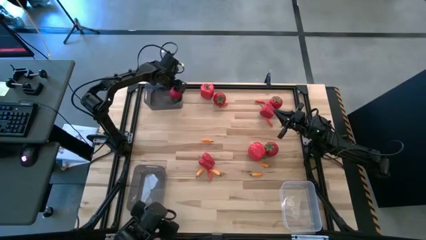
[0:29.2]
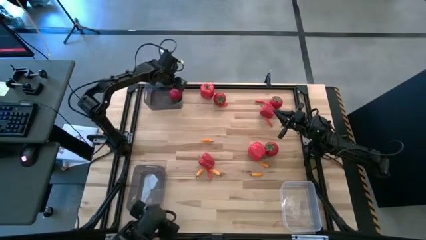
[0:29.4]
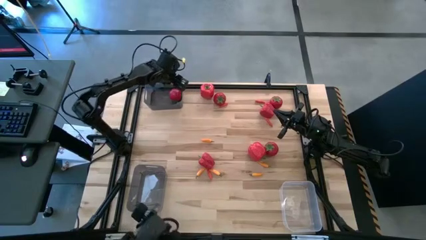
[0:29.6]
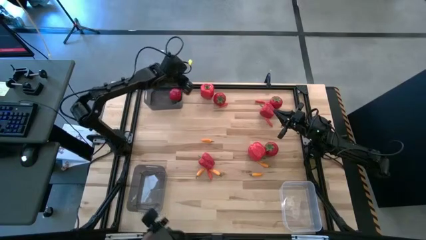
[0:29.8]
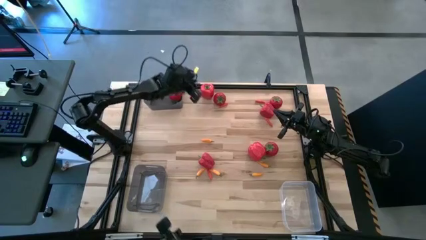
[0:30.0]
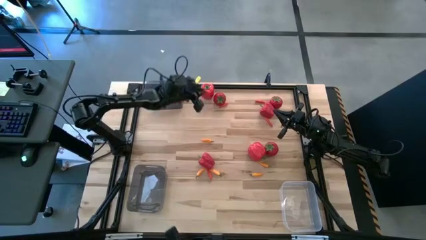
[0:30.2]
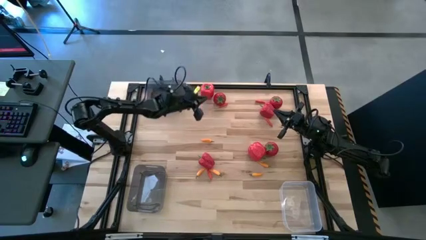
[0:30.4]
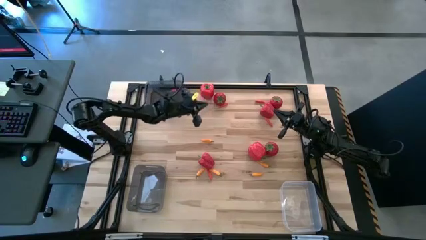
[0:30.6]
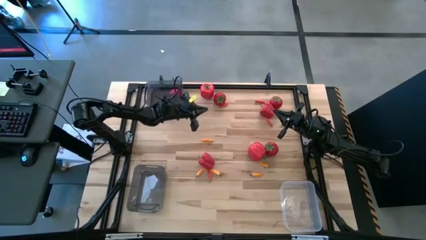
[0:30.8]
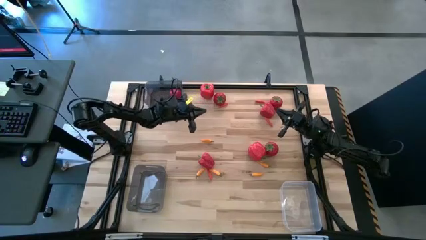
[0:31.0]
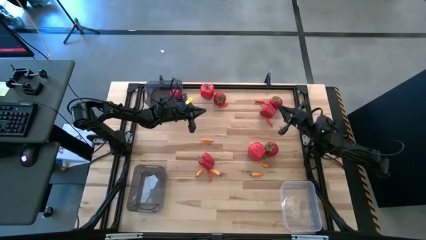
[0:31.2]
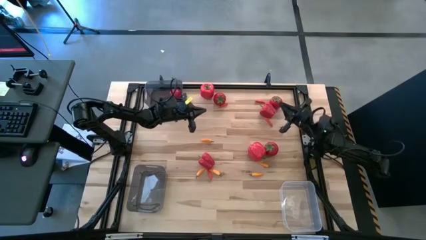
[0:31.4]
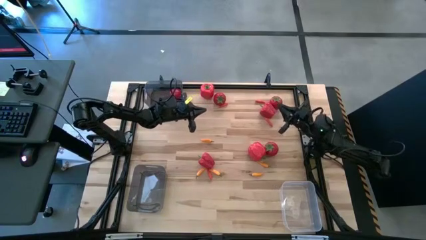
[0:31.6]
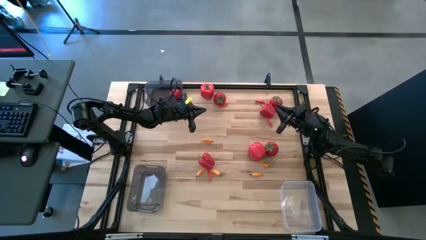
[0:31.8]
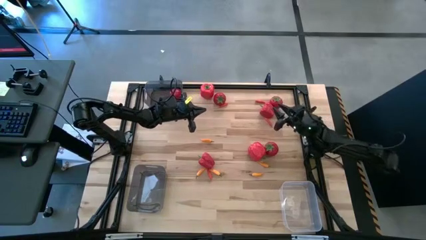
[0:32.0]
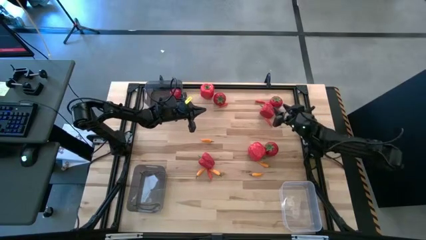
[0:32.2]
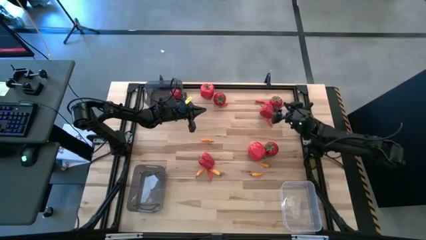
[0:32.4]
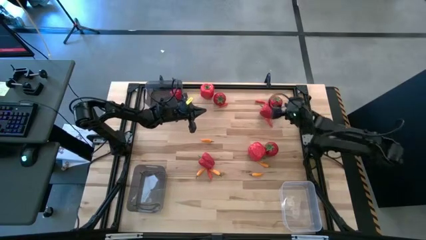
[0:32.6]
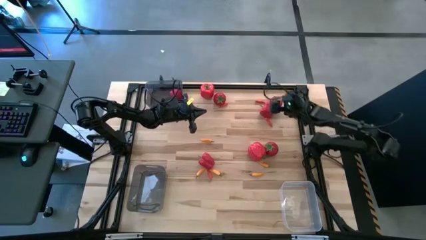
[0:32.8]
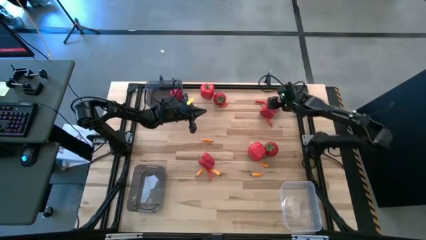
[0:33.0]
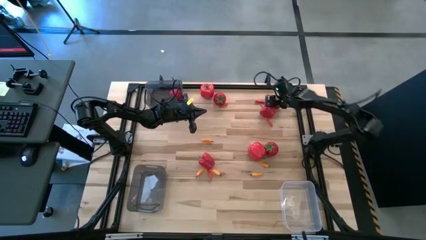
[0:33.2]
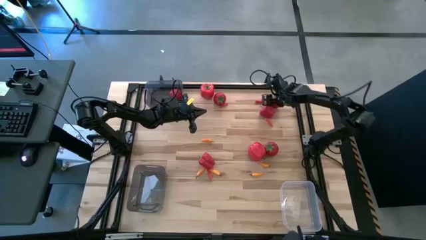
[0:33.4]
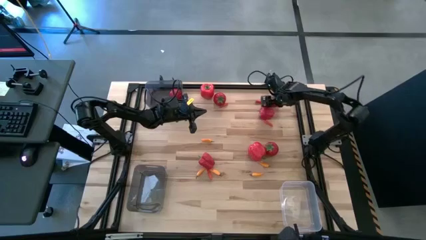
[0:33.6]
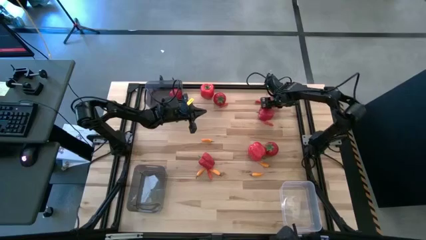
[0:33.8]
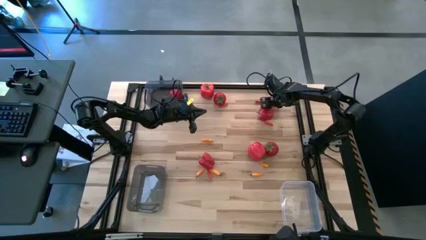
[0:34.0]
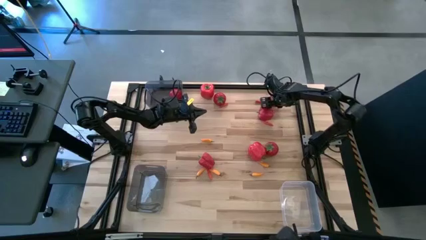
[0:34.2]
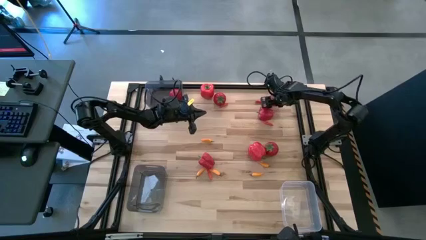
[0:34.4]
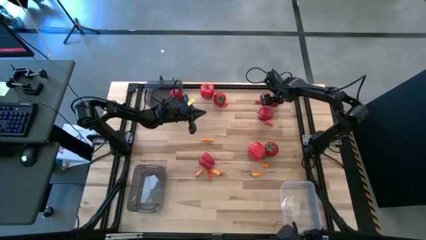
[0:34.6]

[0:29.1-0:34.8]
Task: Sort produce into baskets
Put the red tomato into the top black bin

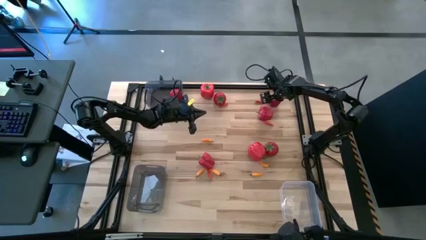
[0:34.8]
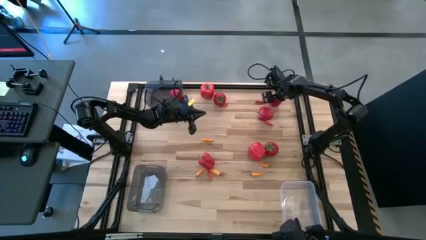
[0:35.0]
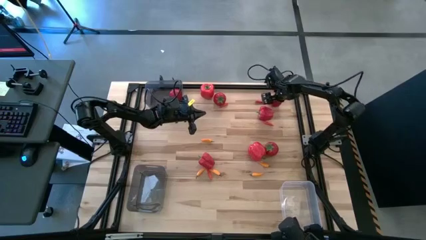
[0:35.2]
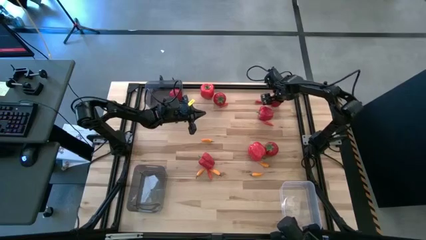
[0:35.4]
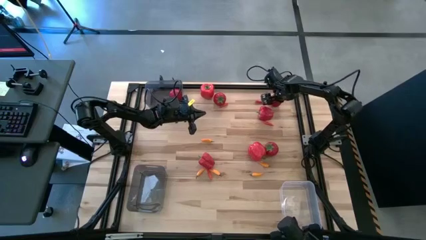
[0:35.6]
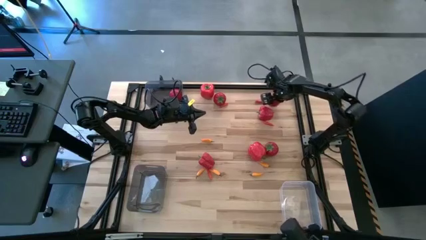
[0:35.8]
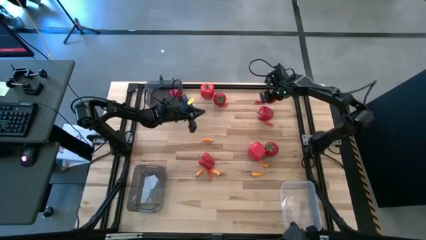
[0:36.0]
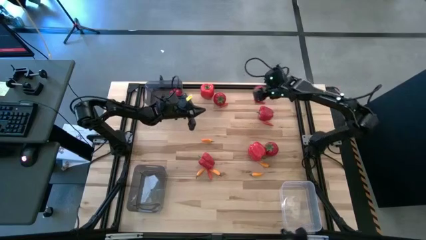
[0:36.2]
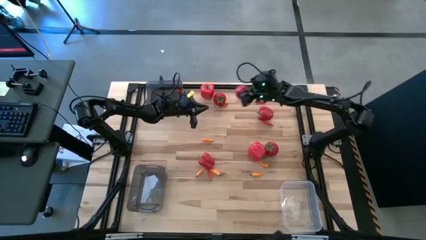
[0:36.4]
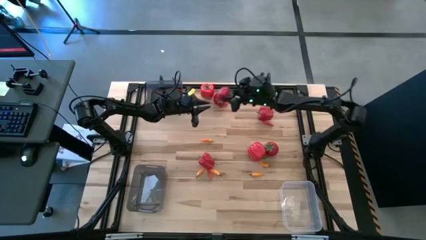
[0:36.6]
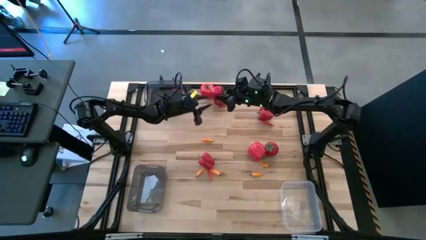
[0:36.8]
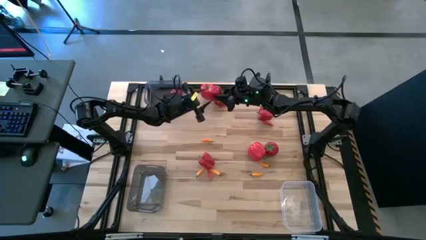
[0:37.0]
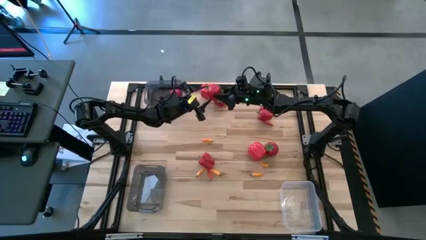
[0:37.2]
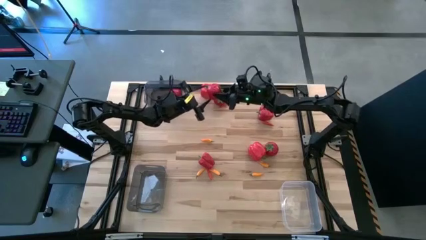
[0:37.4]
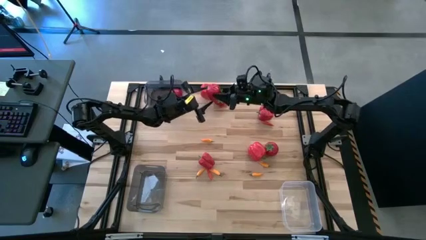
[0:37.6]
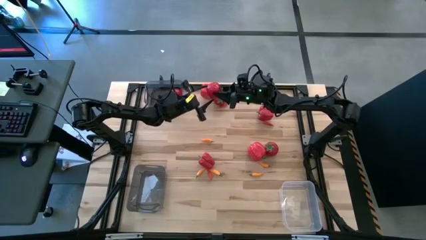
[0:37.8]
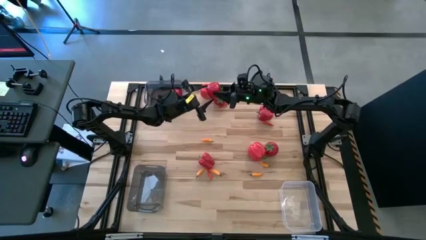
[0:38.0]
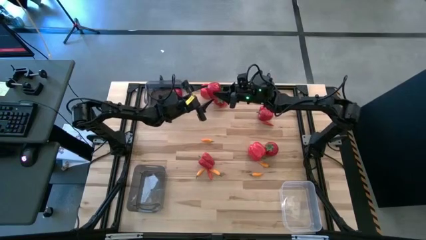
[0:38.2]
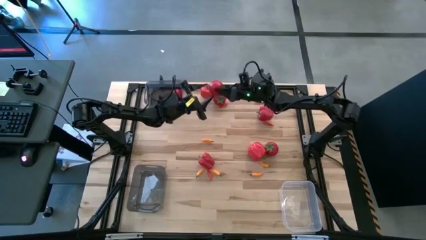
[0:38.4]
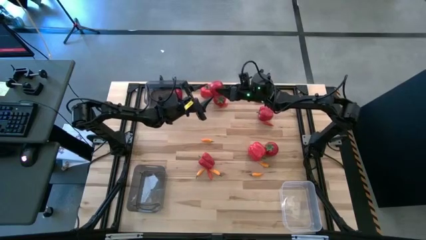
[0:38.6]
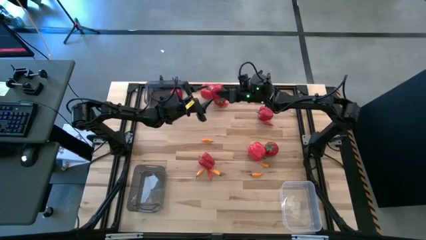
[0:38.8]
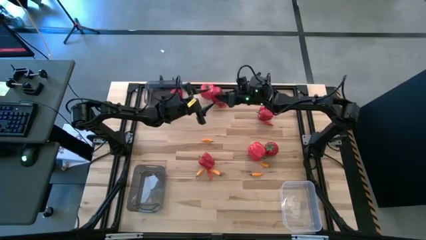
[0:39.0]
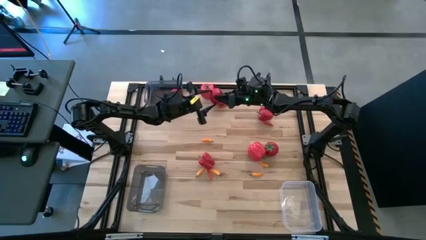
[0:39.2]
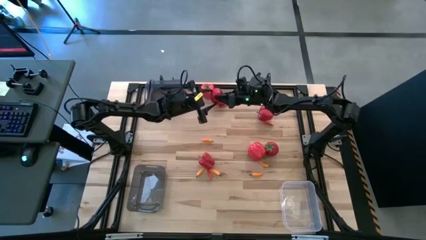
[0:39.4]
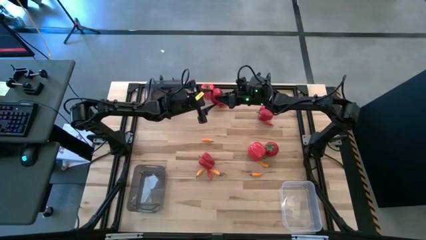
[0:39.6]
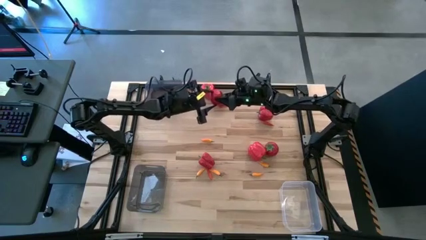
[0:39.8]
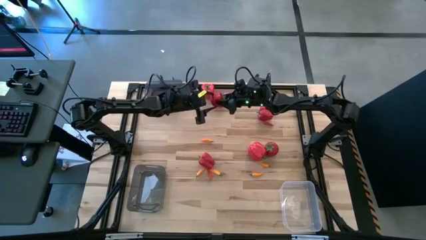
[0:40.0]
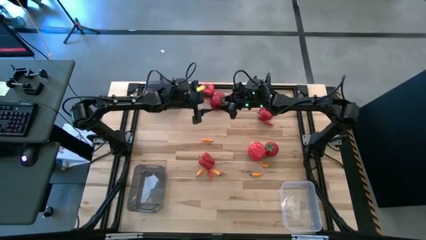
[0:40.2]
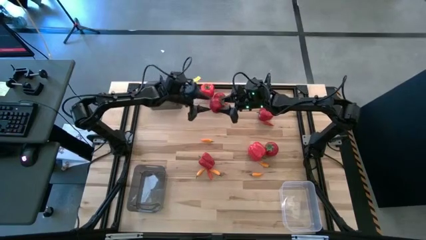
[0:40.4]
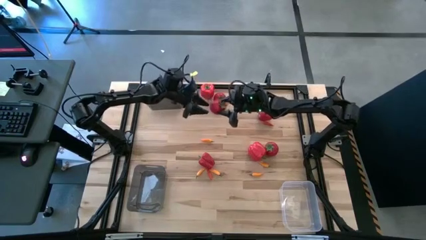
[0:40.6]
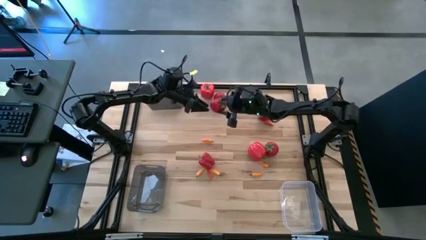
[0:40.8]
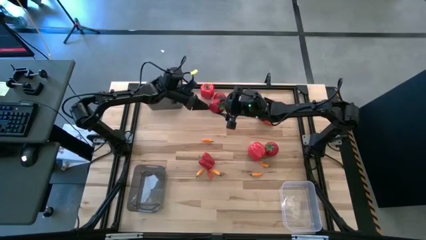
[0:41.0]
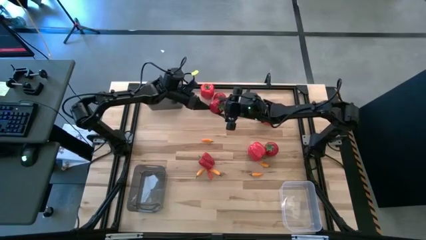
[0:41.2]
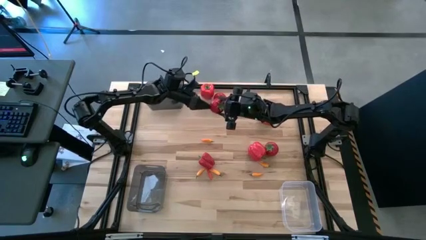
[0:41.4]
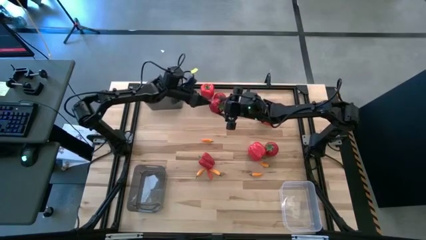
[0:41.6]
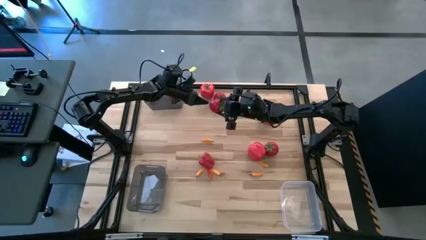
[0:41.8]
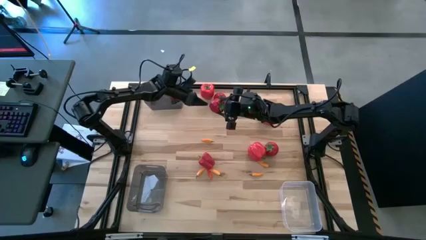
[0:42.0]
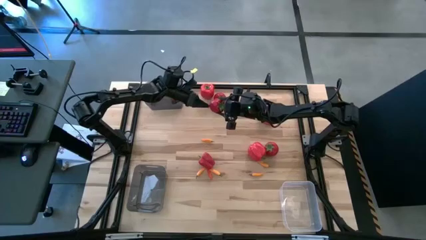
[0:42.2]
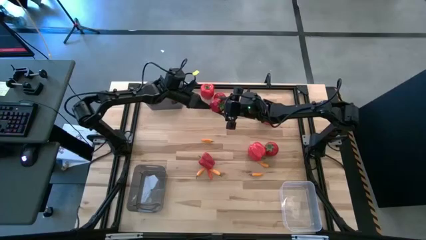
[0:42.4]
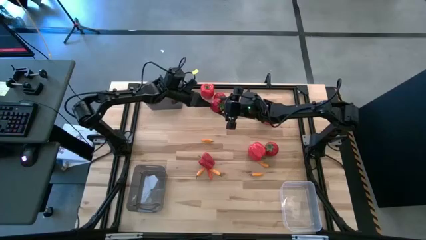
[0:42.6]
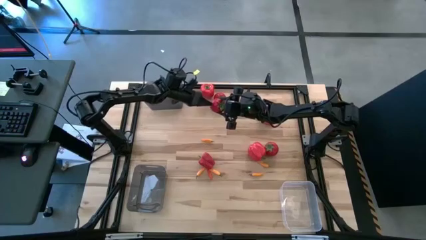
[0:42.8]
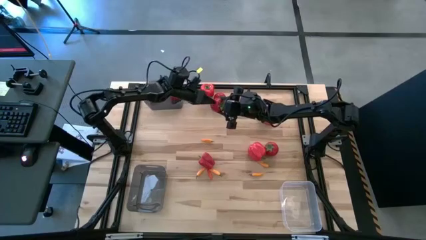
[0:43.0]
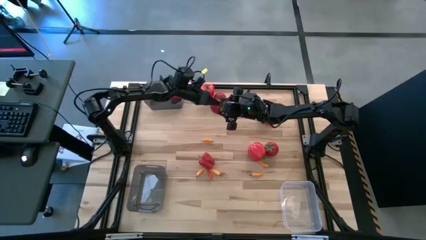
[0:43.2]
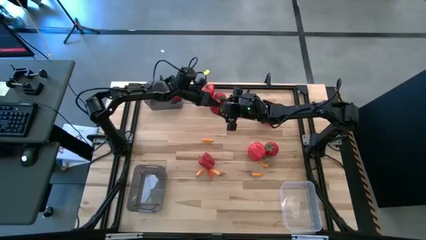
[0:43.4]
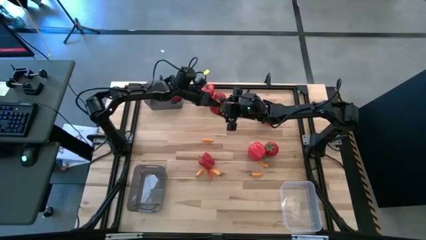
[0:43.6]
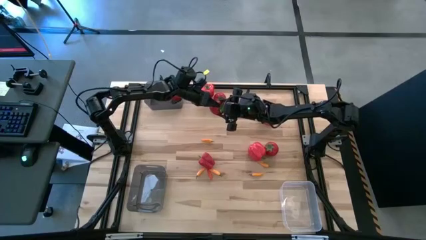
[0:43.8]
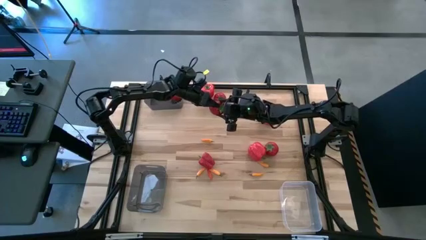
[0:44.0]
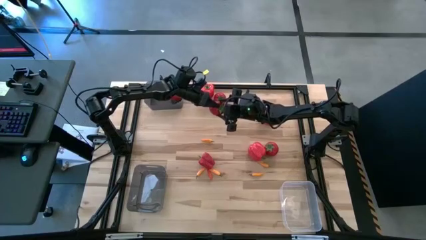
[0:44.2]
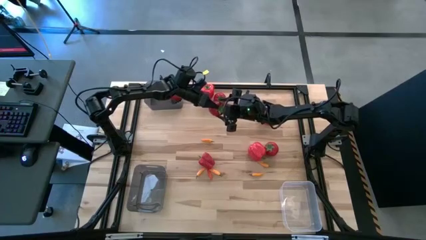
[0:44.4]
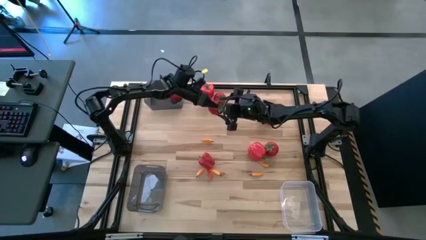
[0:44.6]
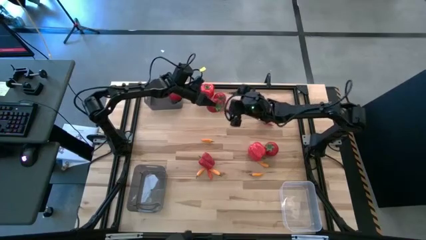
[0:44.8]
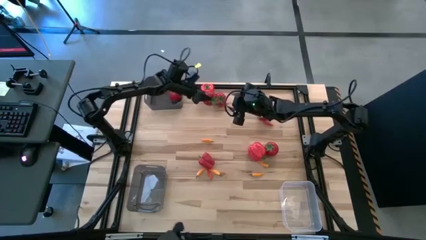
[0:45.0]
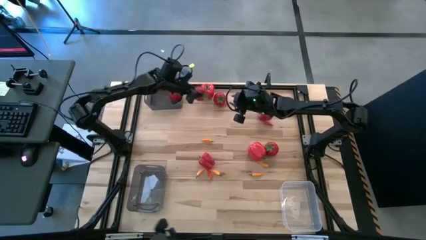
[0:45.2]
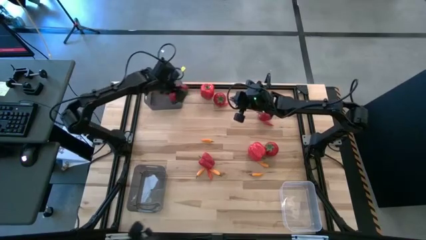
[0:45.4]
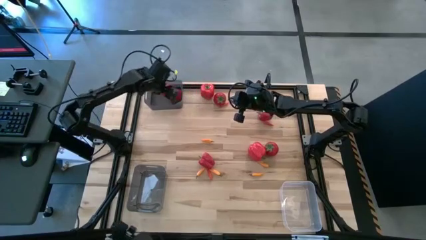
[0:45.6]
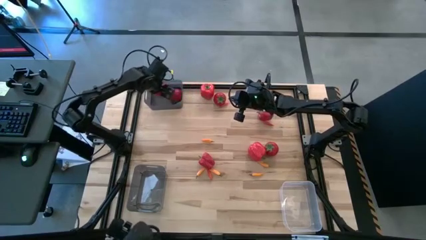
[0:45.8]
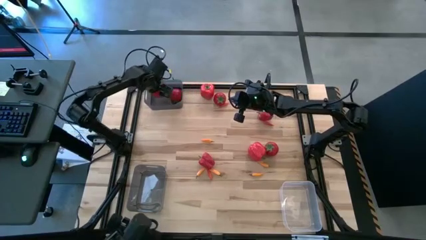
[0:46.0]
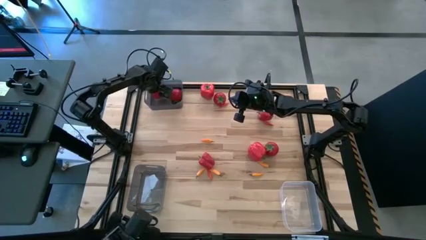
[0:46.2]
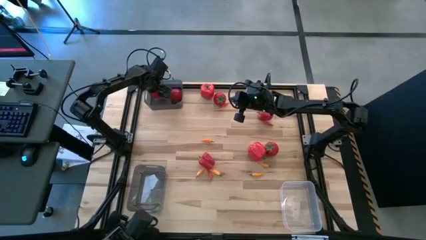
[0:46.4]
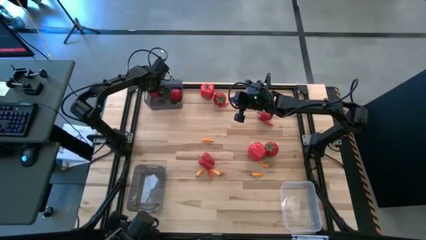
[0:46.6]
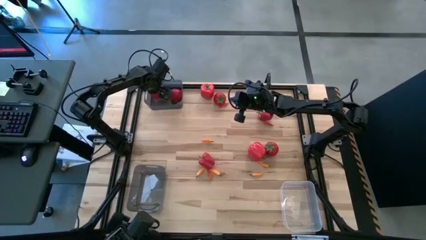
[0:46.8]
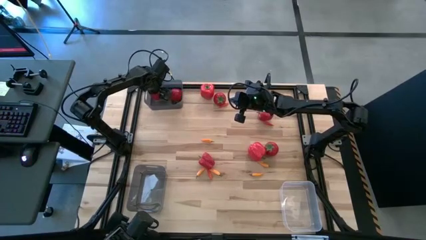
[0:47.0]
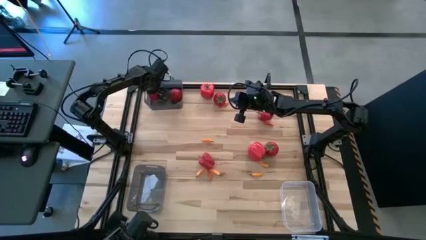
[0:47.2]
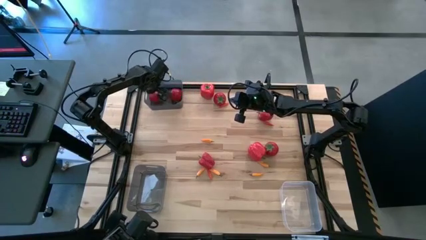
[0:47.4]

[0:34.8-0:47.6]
Put the red tomato into the top black bin
